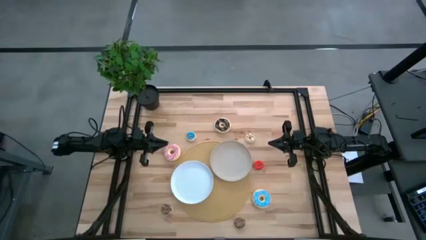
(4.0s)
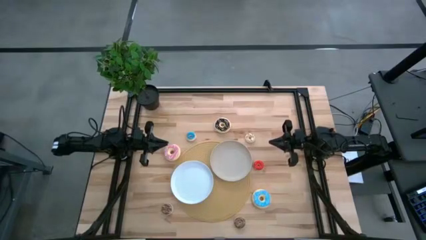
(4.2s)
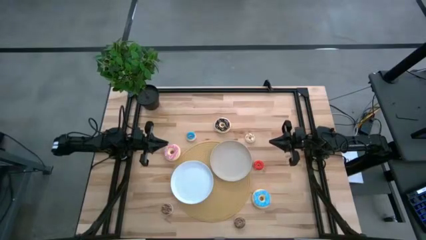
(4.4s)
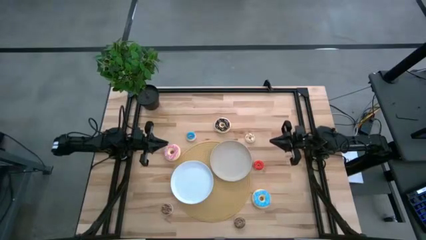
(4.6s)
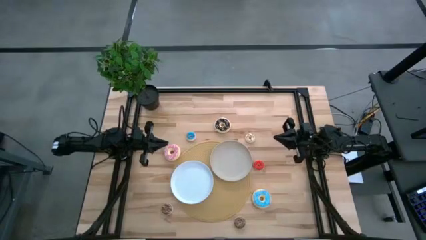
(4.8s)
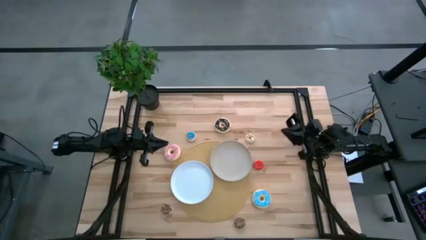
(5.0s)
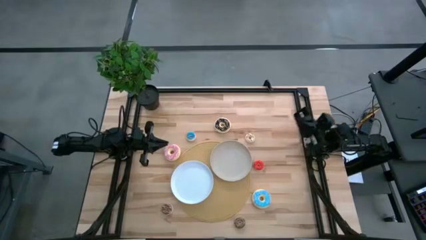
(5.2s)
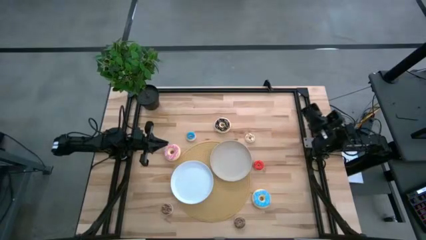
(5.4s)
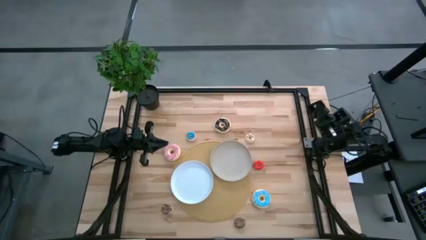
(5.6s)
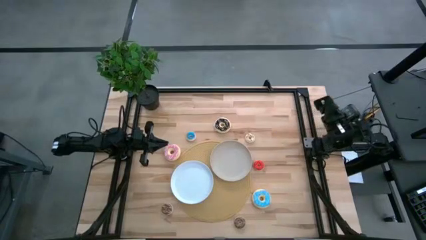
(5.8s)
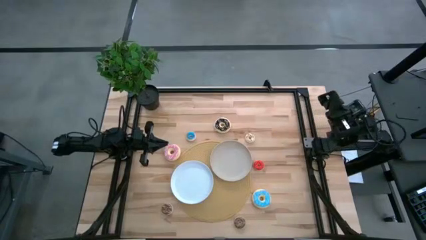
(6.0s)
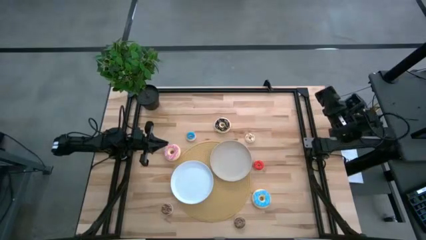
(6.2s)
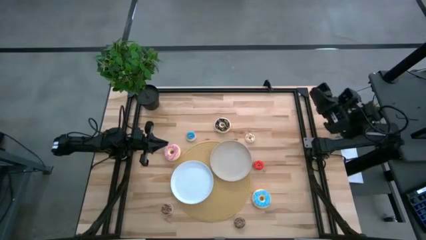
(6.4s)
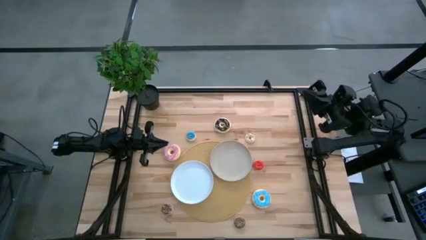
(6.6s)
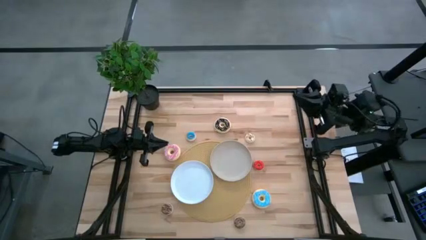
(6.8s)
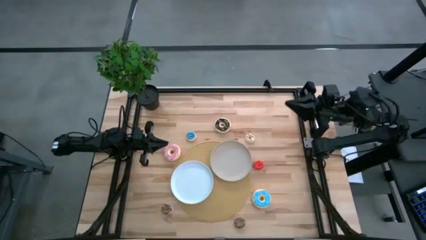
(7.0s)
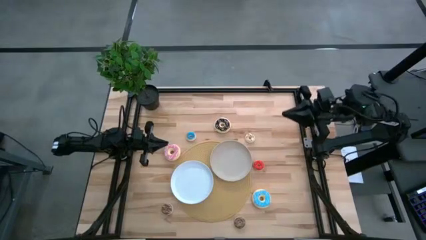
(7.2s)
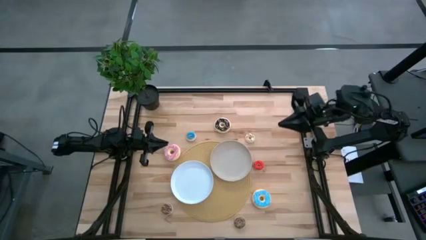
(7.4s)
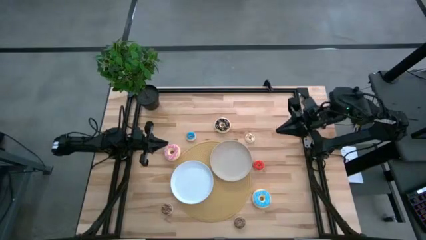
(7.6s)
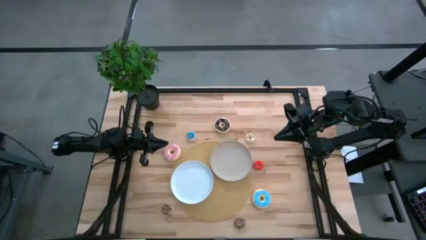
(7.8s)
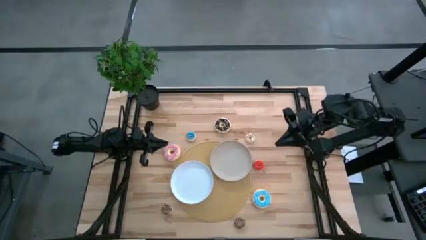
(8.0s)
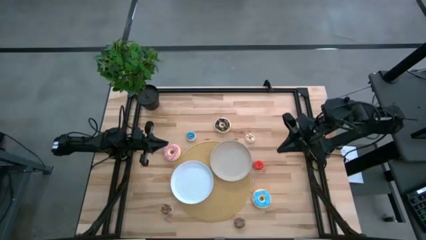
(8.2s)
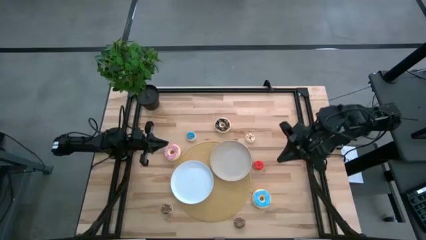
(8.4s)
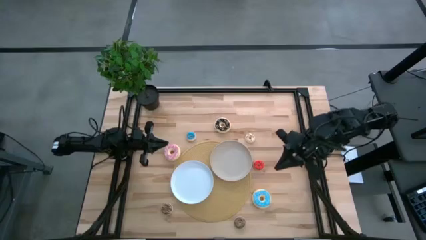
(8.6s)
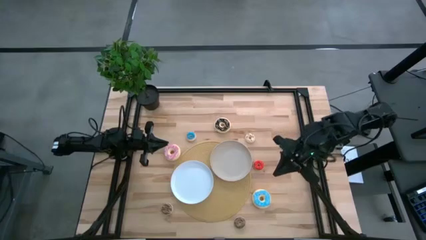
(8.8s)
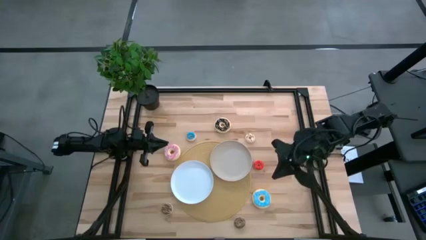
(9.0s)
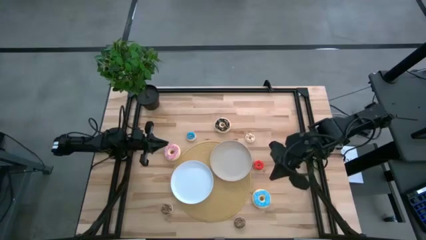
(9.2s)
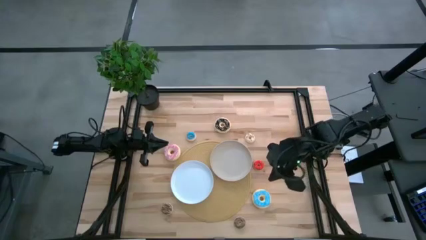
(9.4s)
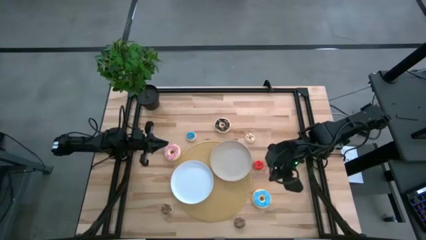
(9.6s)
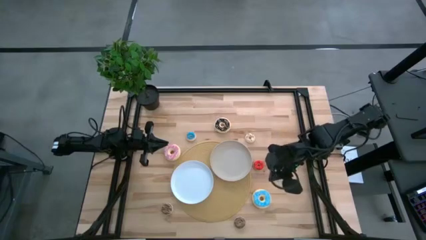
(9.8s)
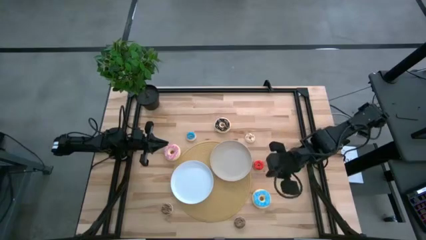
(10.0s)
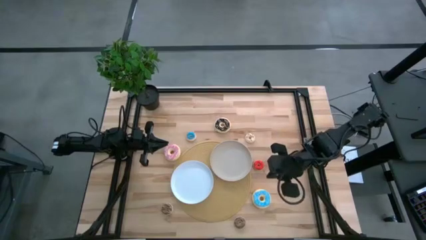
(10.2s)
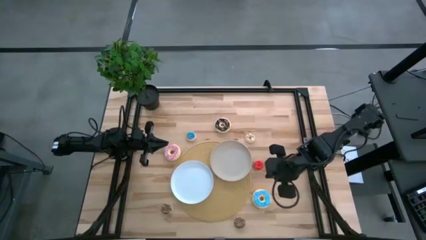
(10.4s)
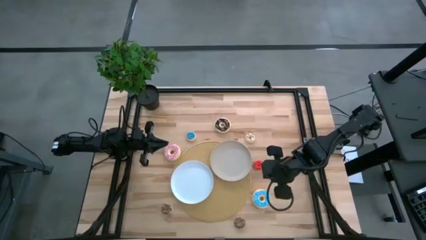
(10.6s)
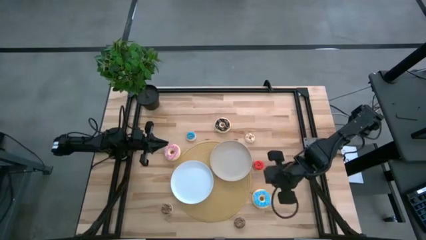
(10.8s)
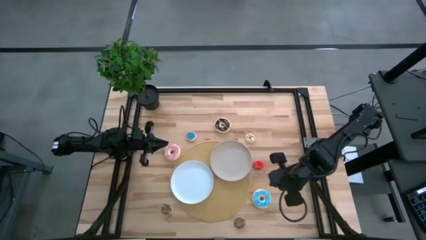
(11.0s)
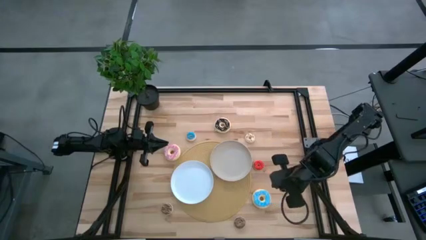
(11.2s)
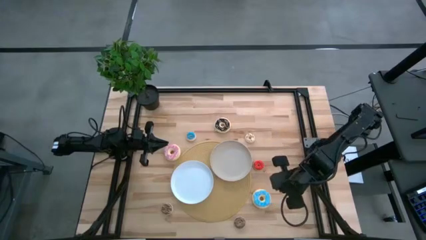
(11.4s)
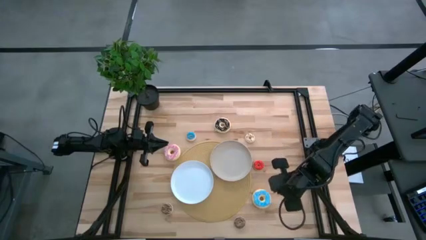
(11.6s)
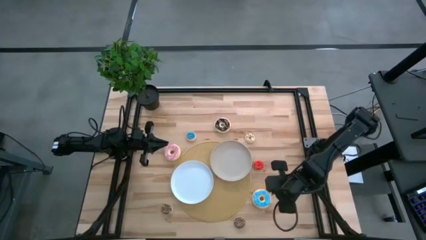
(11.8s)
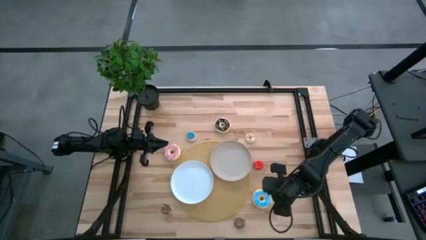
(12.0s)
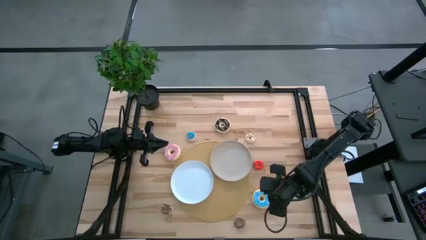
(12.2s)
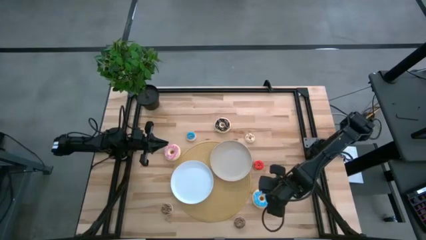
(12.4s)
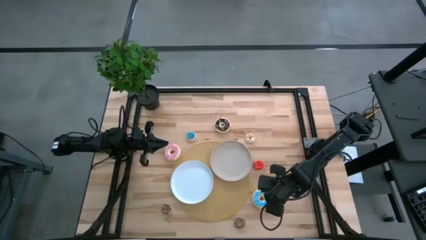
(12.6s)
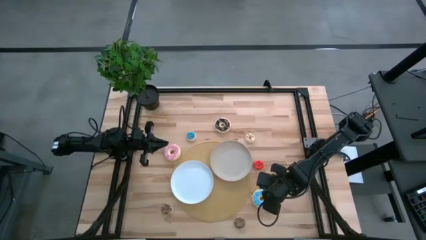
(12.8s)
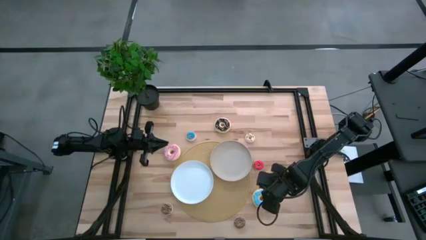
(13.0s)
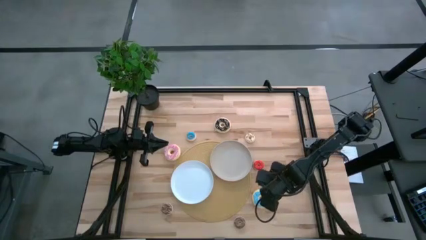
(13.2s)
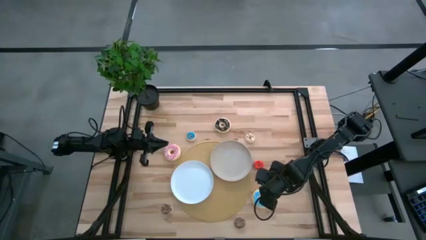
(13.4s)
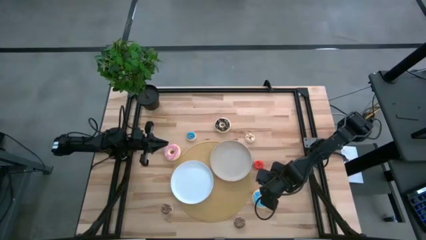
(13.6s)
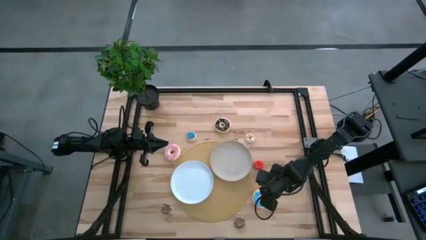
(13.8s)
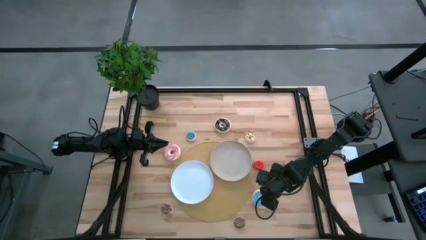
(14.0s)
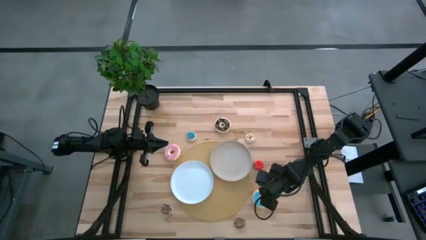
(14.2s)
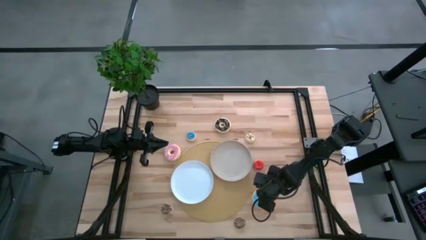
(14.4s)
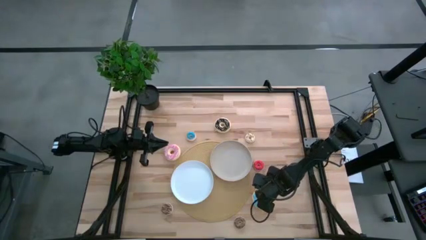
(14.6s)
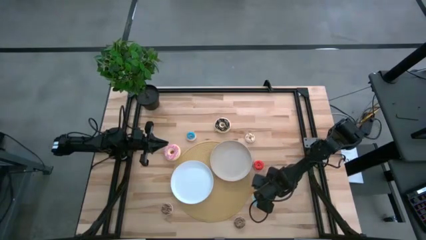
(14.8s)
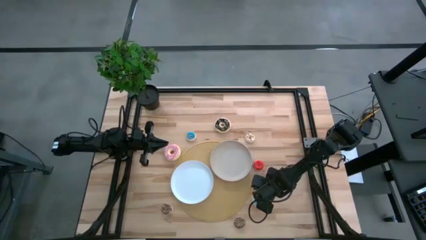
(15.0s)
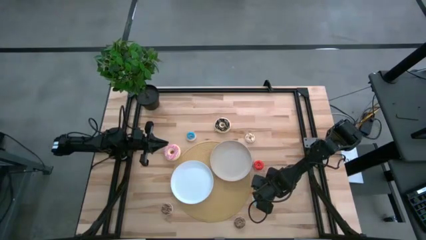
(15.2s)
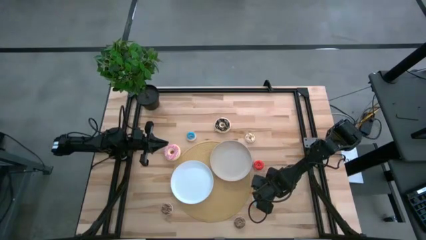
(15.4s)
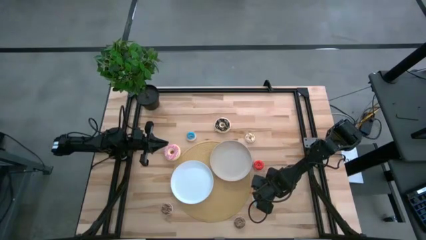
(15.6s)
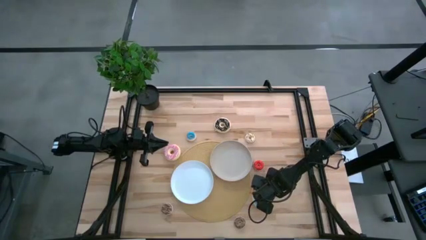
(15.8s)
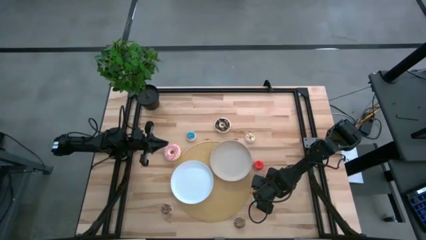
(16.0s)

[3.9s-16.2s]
Task: Pick & Place donuts
Put the large blue donut on the gray plate
